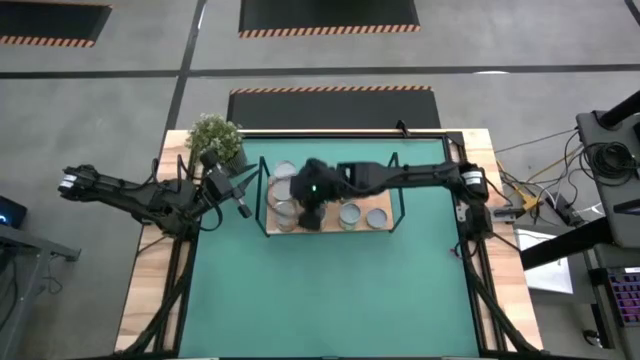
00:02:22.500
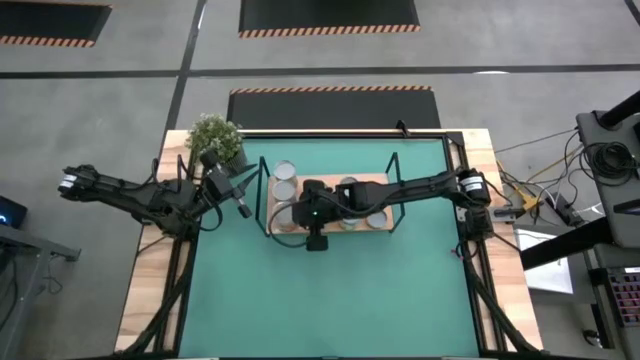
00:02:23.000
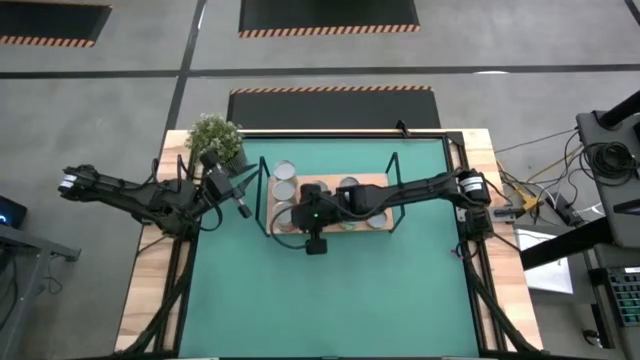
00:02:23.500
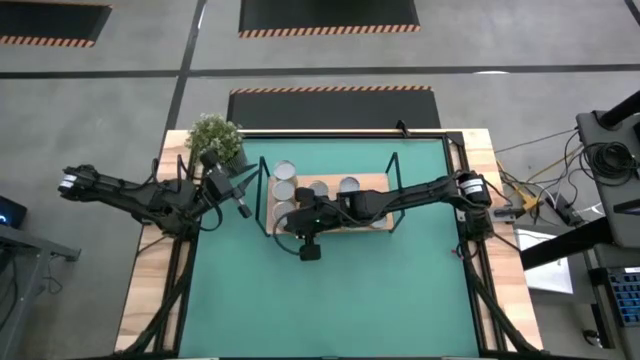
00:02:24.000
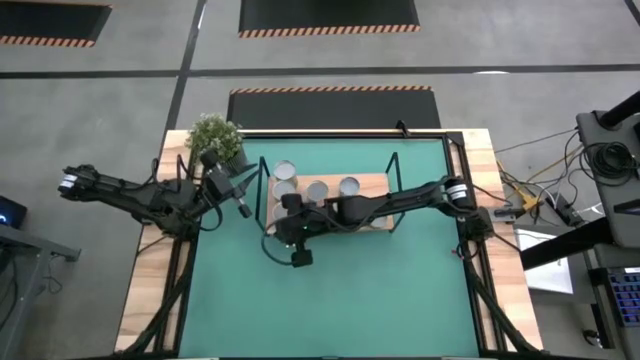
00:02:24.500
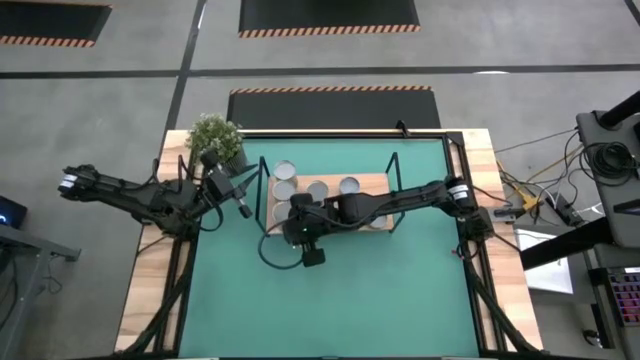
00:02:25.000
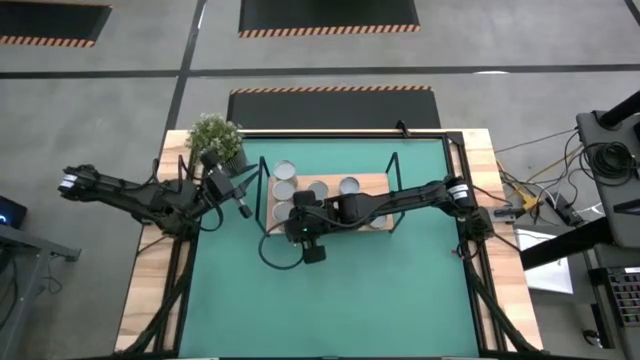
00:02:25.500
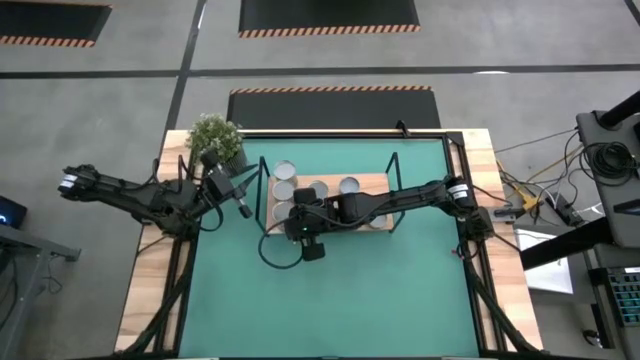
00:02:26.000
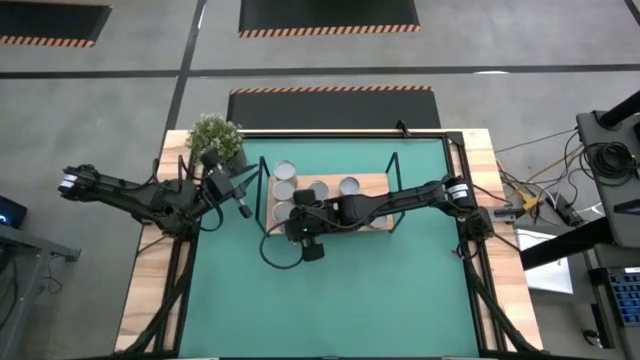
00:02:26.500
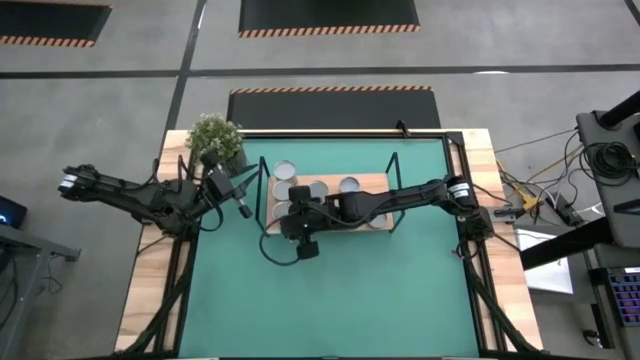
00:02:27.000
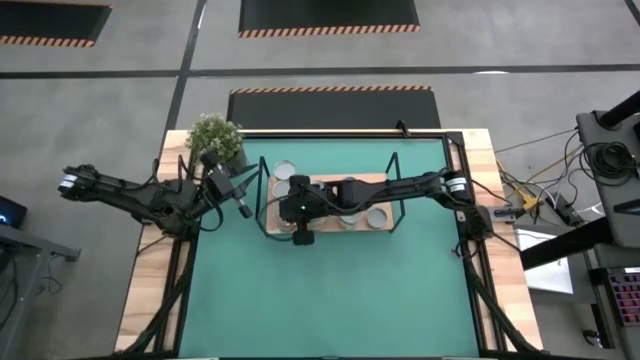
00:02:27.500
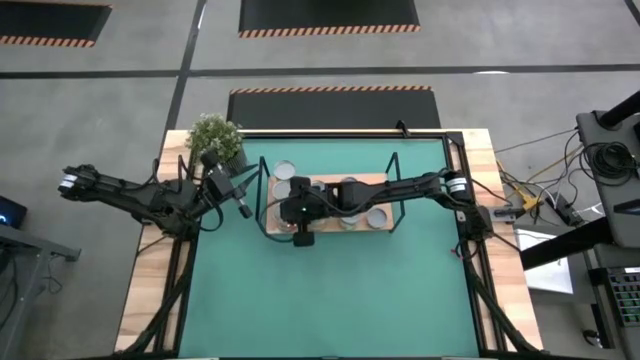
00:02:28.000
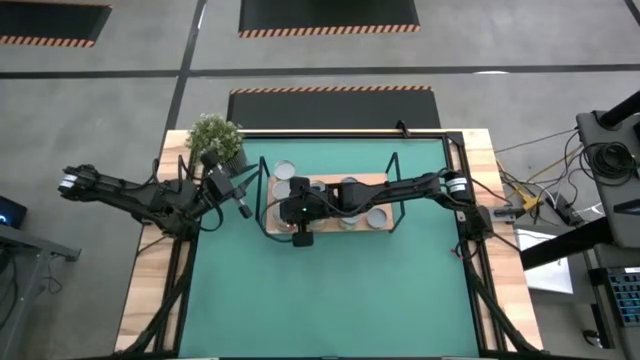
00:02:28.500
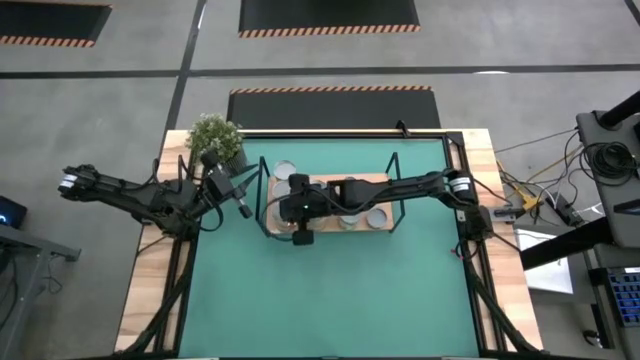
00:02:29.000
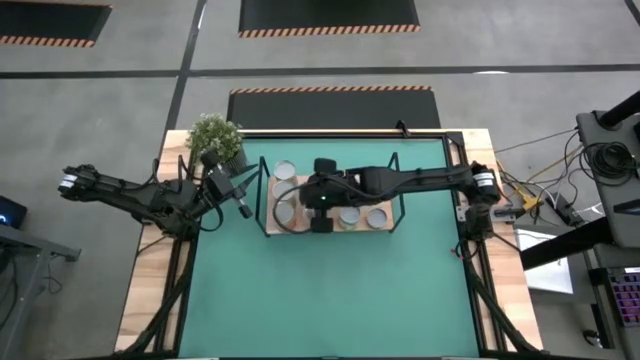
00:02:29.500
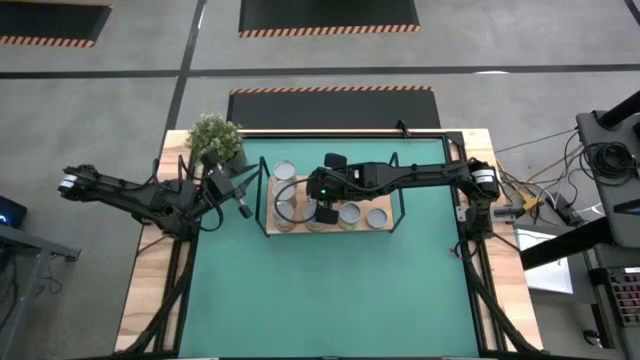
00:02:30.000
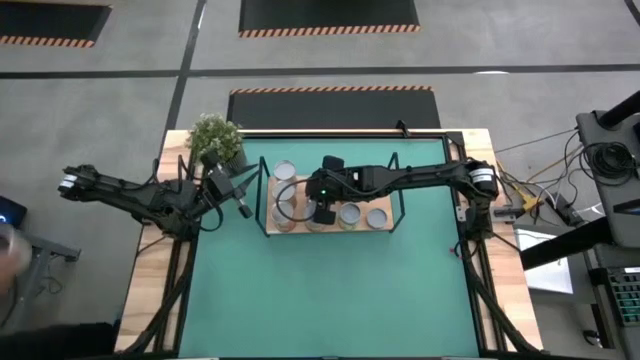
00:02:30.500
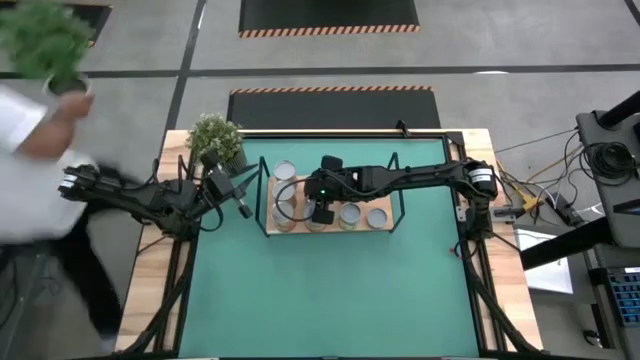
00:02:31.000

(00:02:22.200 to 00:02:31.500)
Task: Pick and place cans onto a shelf
Adjust the cans on the shelf

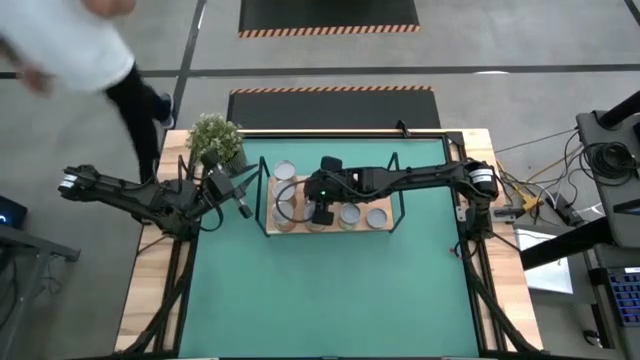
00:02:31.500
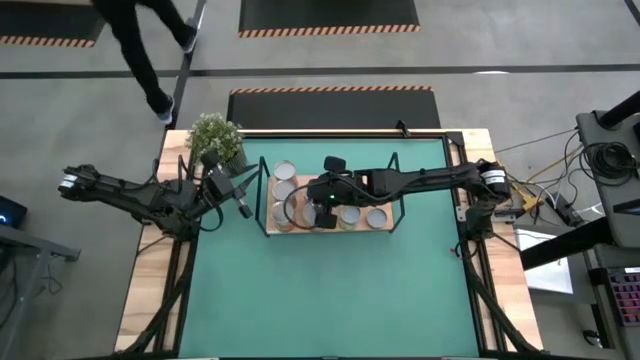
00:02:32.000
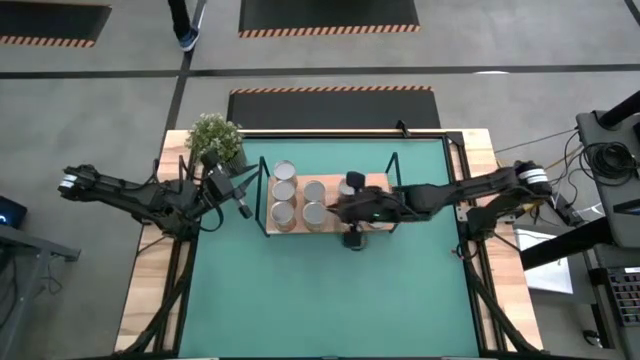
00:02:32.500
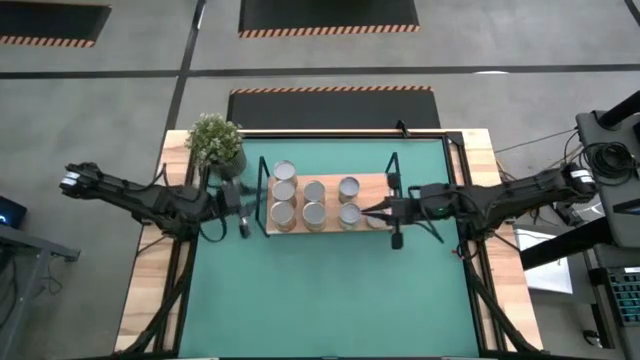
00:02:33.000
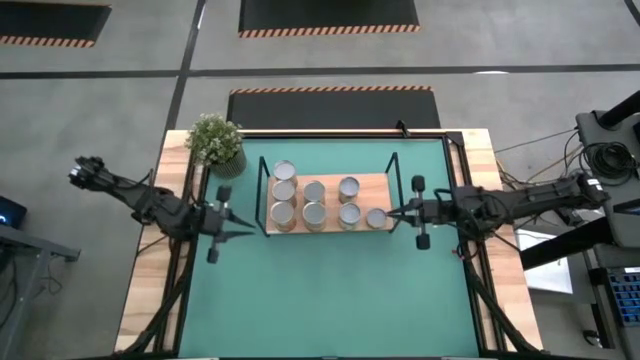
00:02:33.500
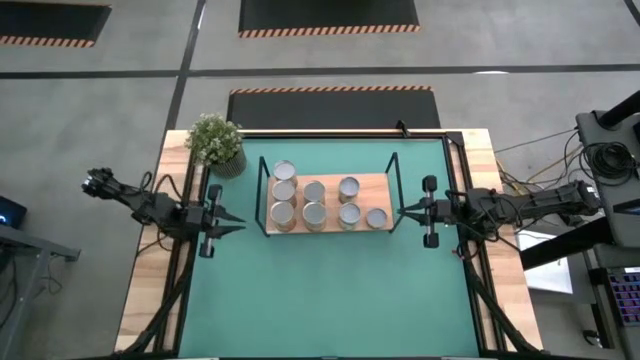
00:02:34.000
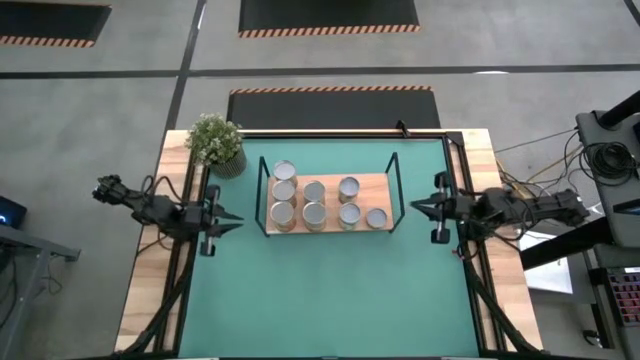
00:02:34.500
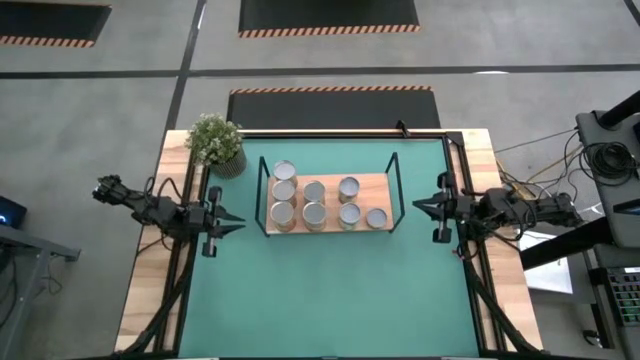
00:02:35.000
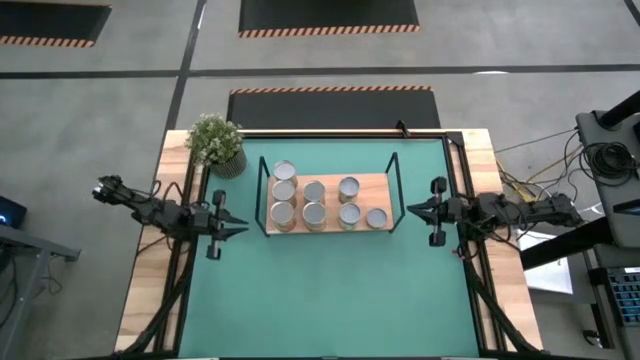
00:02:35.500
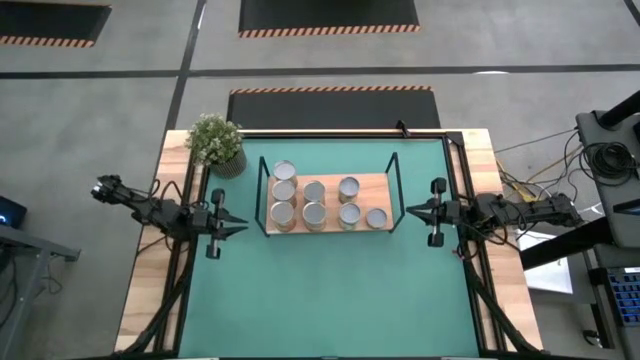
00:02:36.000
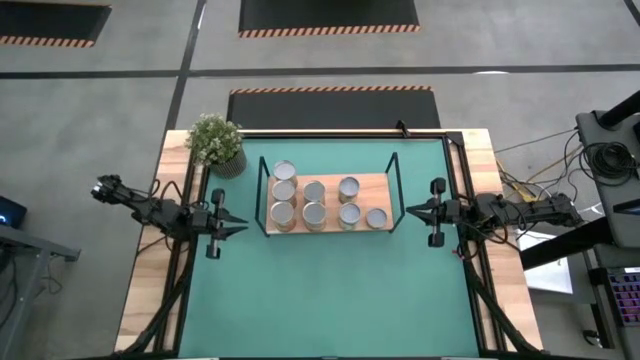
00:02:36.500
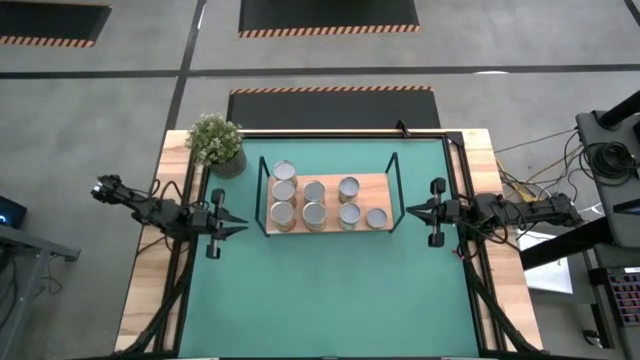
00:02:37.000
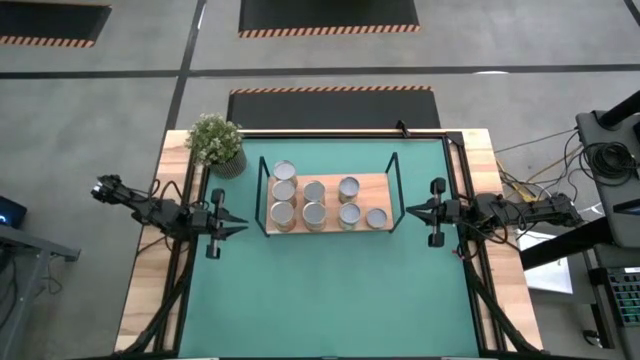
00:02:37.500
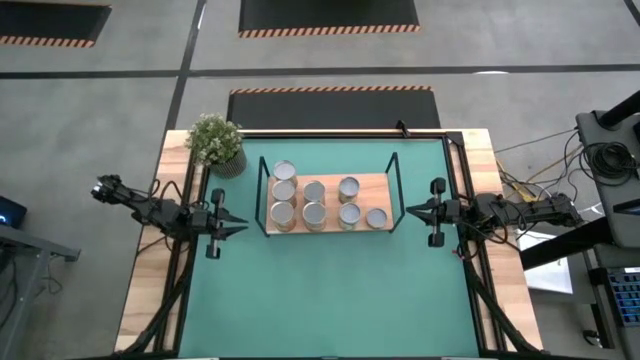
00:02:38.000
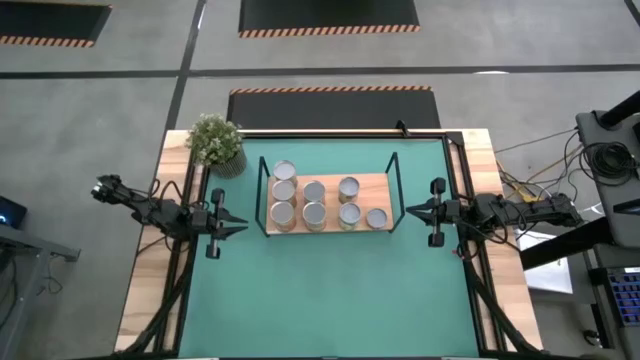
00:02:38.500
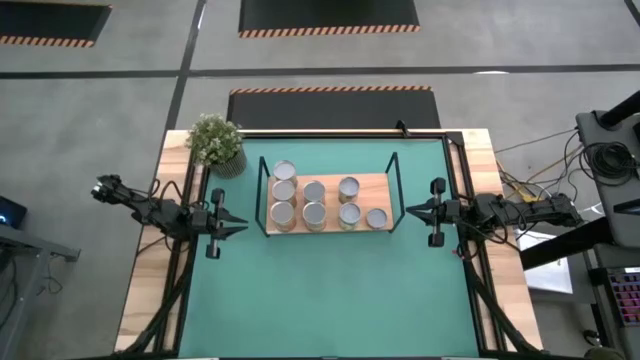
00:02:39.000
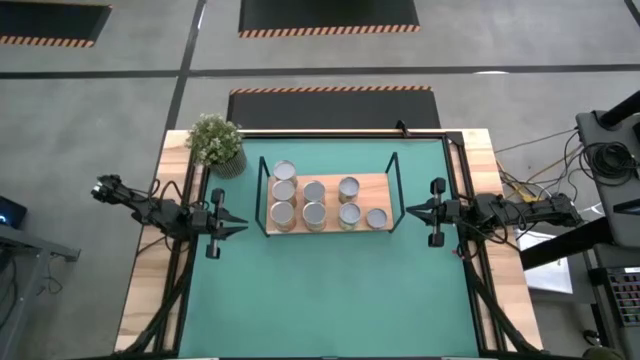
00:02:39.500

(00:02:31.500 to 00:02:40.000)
Return to Home Position

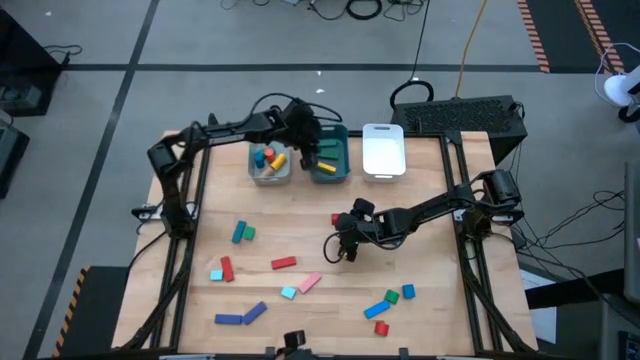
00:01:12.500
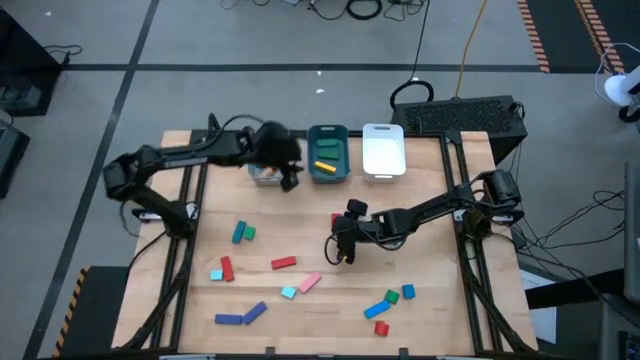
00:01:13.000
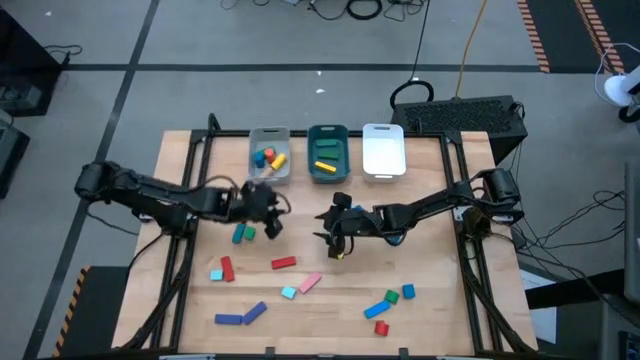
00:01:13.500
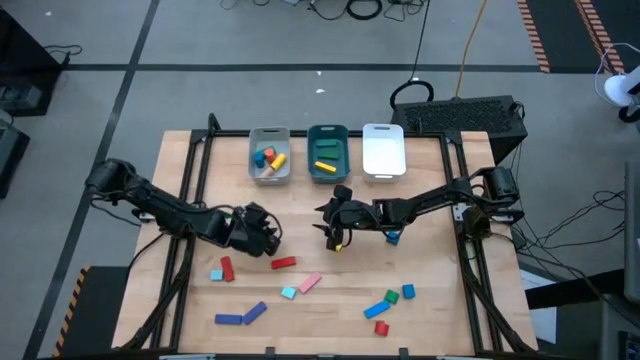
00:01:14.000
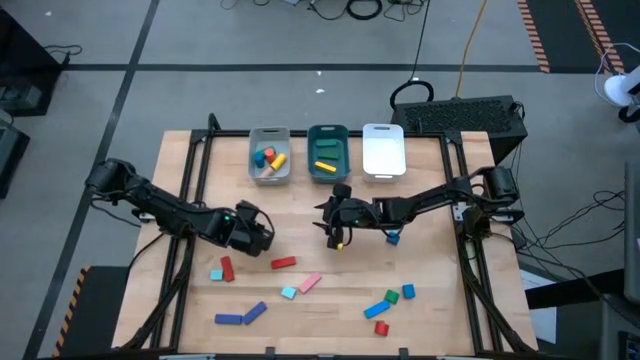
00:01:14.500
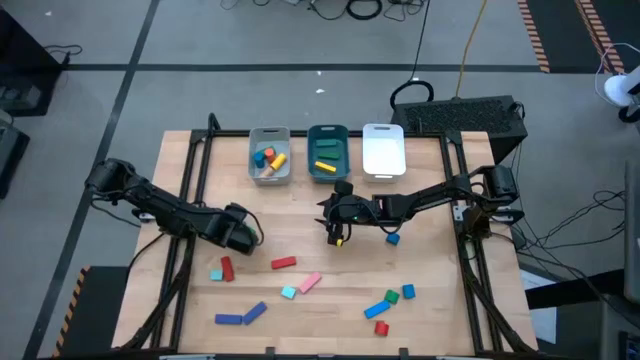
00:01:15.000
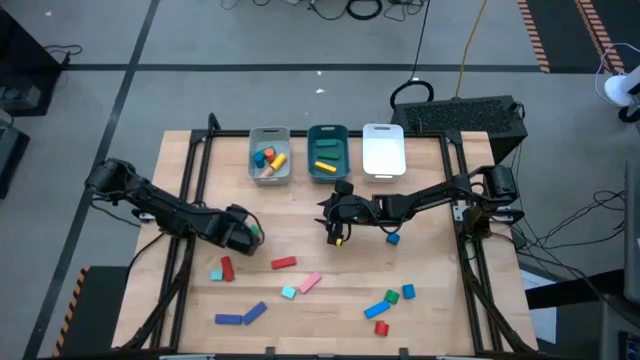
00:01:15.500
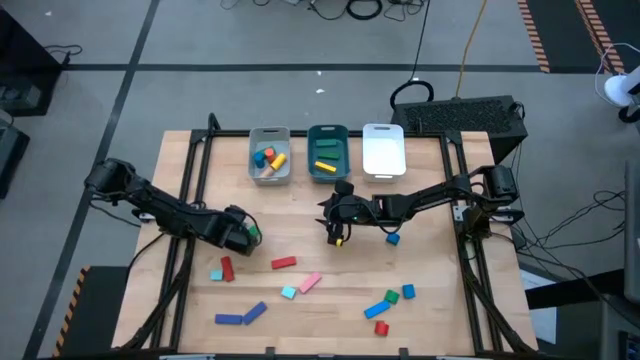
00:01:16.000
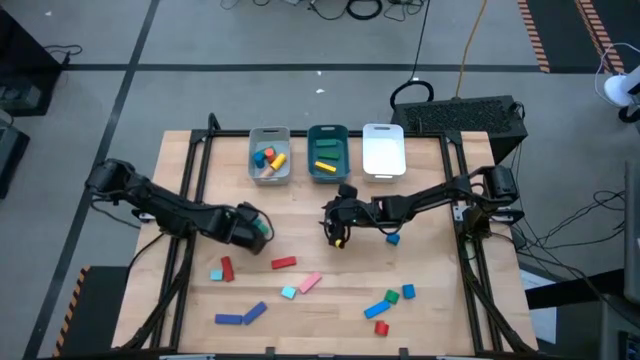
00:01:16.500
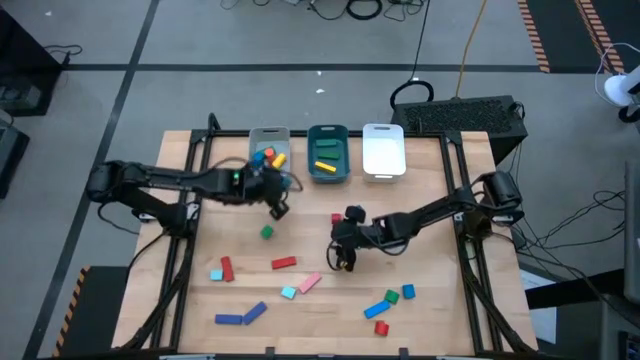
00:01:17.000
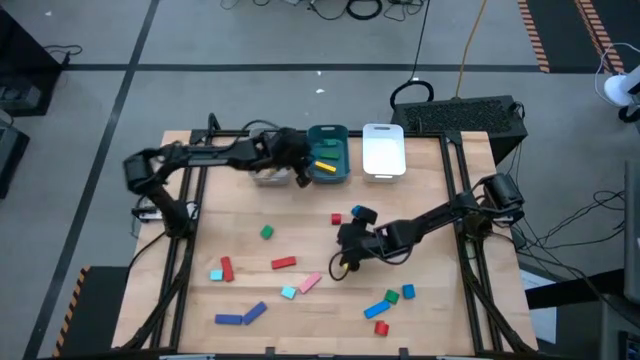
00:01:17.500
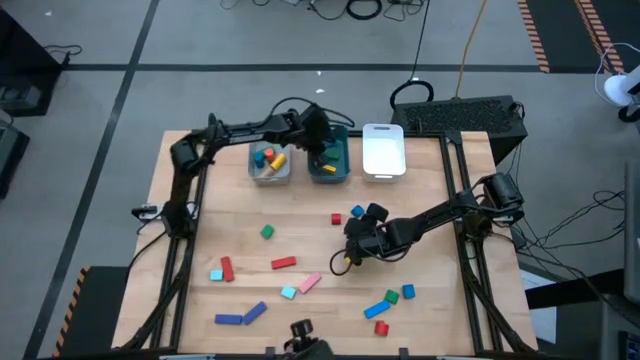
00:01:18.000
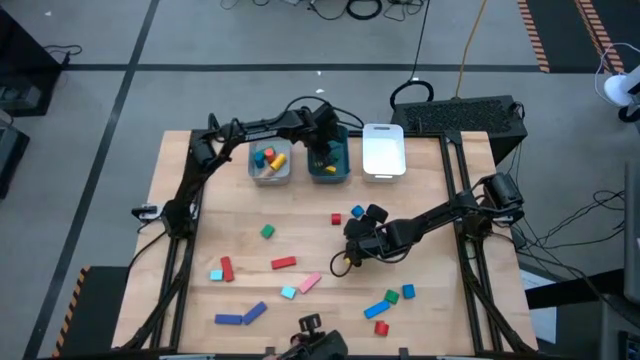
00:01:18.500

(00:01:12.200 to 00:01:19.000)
Task: Sort blocks by size
Put the dark blue rectangle block into the blue bin
